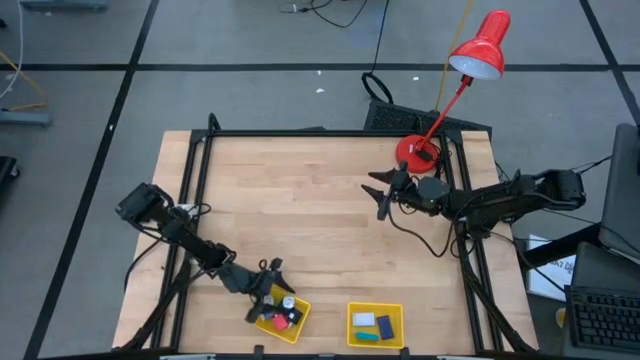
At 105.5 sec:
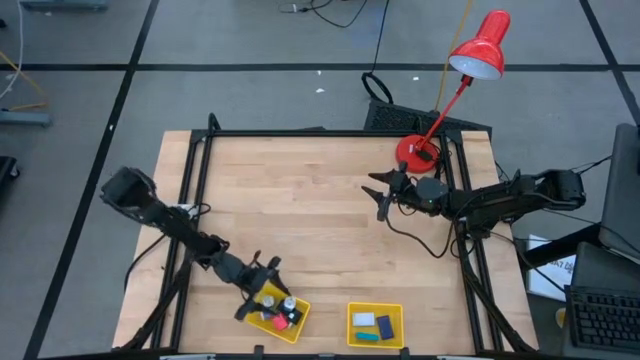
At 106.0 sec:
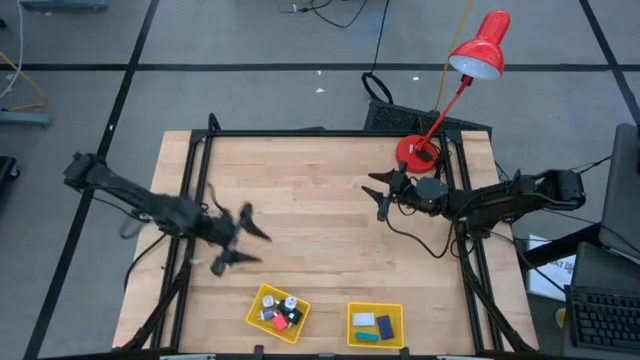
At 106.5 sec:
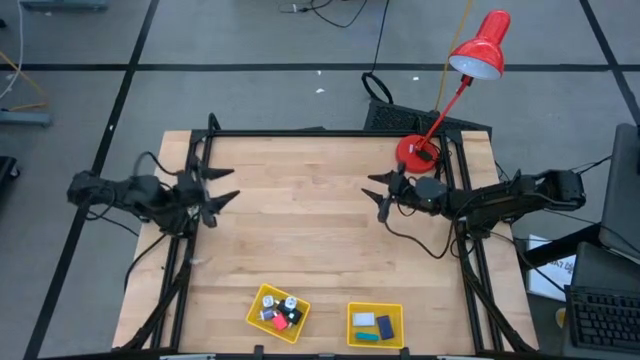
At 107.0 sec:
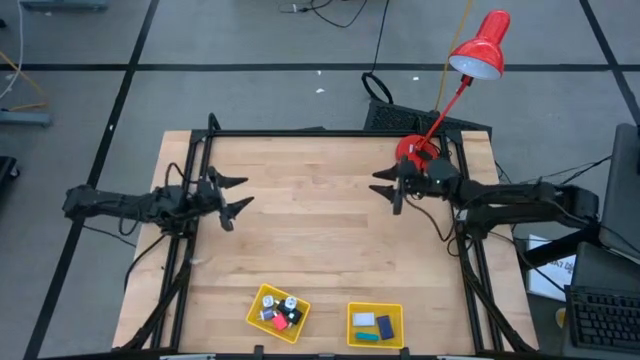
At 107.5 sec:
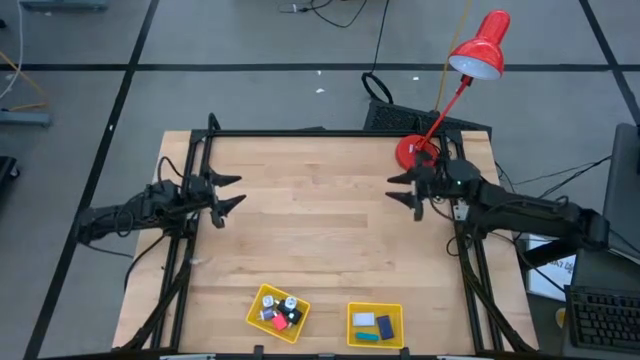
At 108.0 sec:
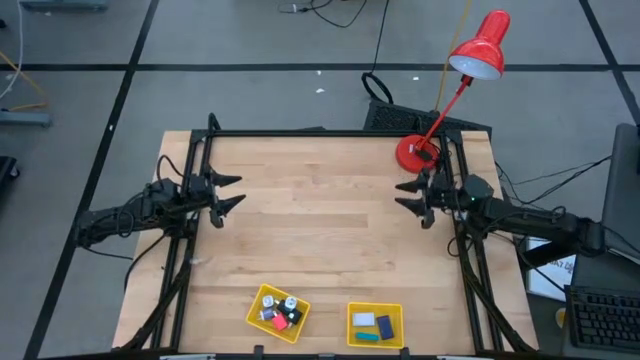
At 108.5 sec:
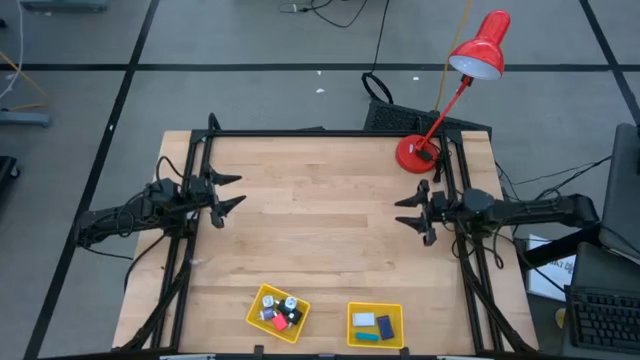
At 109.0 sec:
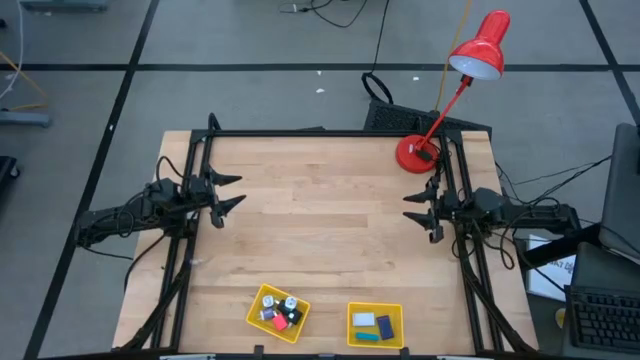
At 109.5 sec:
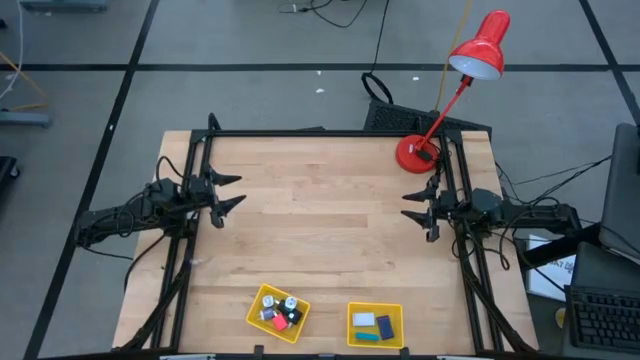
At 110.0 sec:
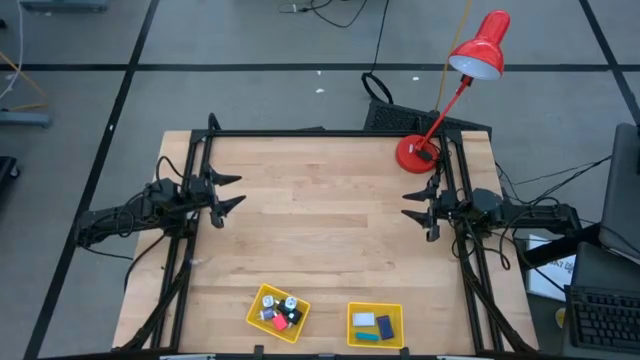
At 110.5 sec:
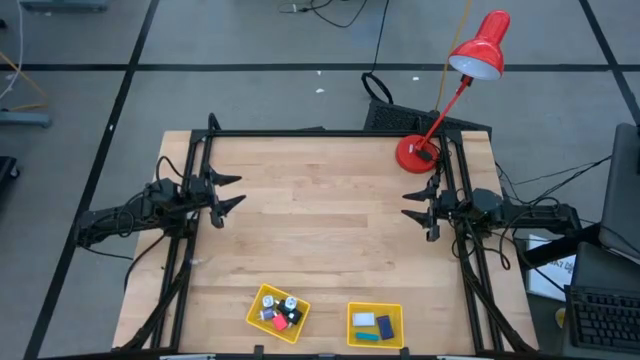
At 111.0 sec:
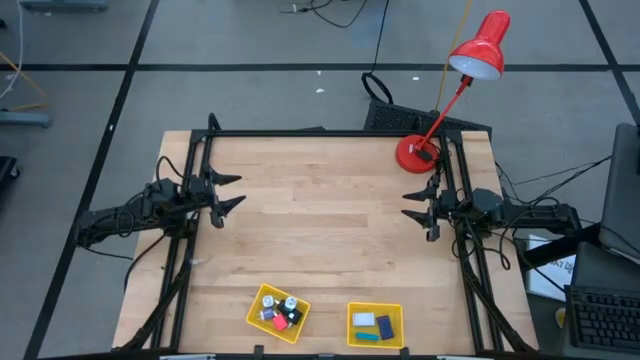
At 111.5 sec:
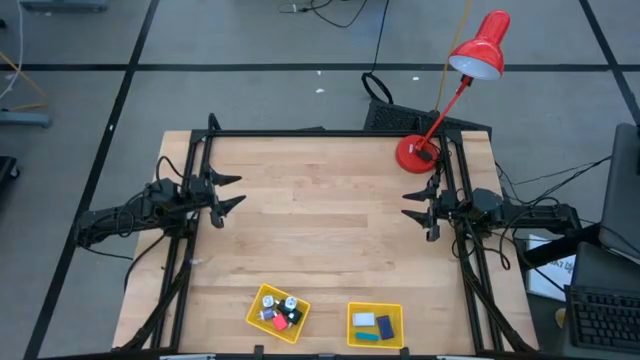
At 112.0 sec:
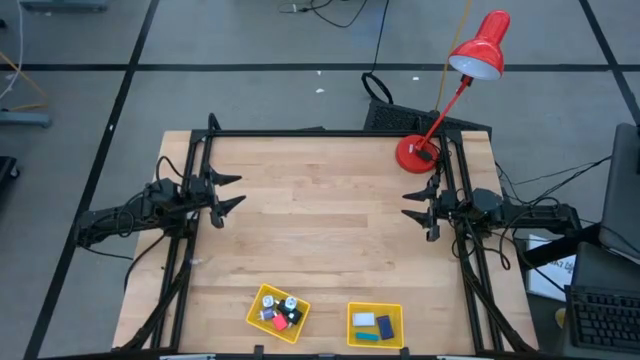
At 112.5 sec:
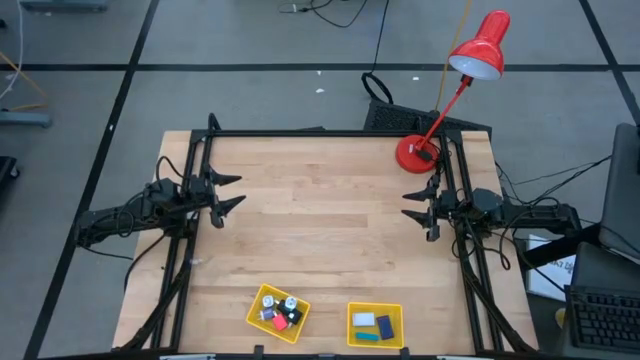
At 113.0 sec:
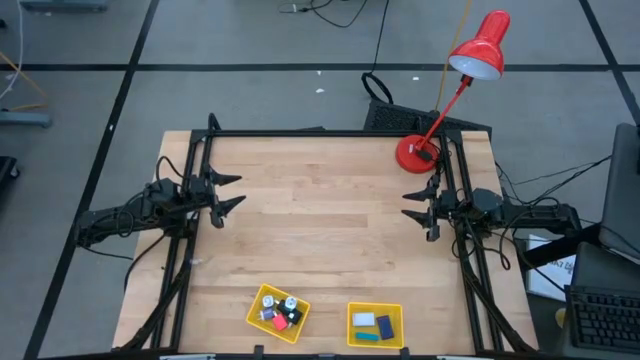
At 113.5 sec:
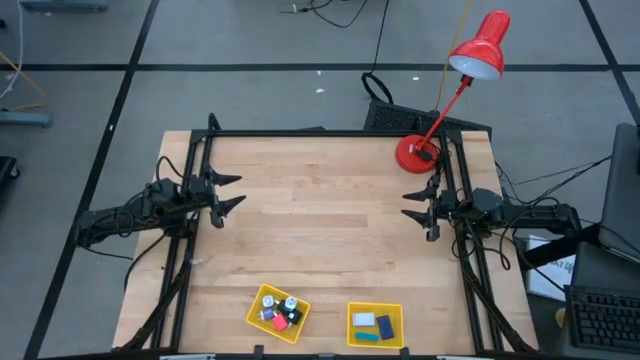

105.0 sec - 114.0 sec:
Task: Pick & Place Office items
Return to Home Position

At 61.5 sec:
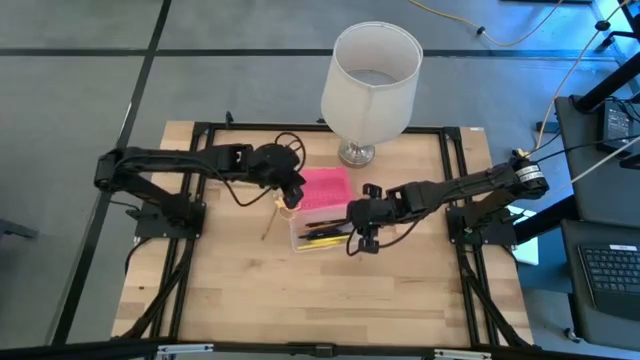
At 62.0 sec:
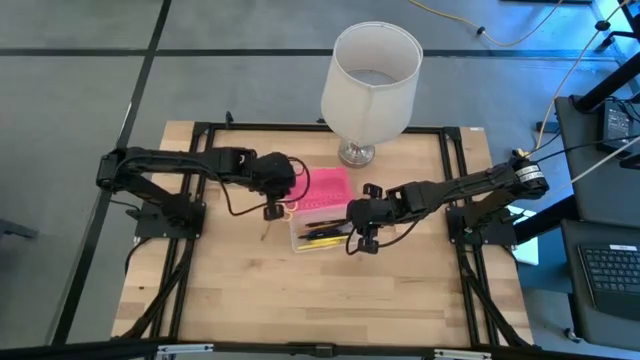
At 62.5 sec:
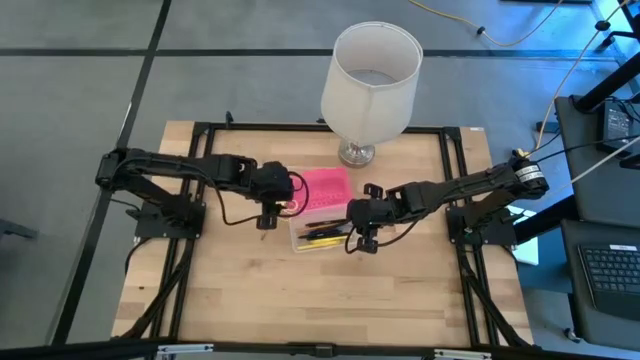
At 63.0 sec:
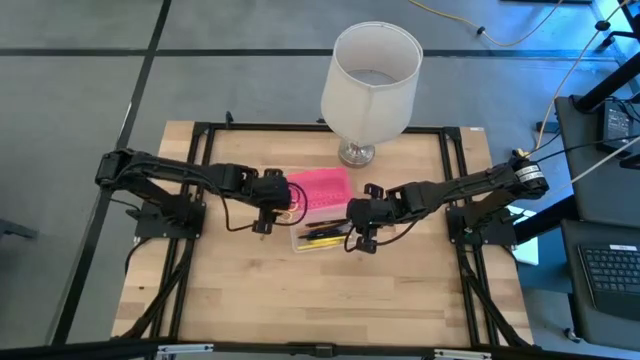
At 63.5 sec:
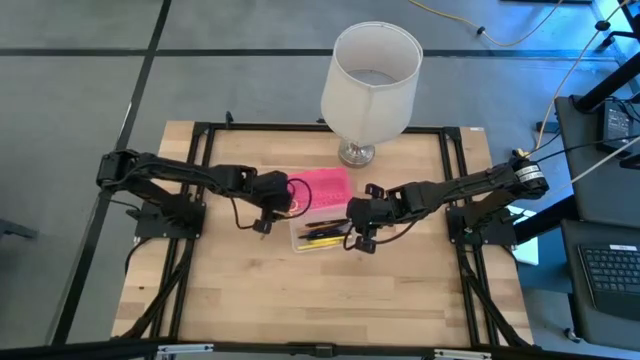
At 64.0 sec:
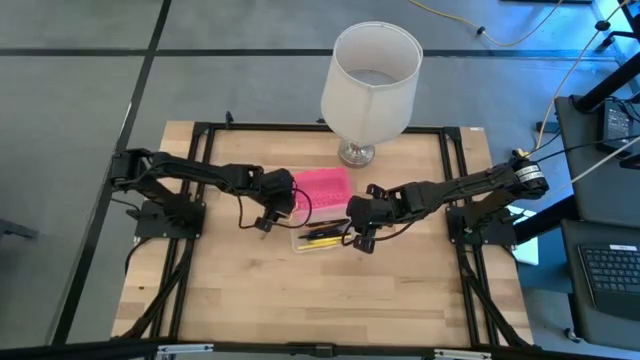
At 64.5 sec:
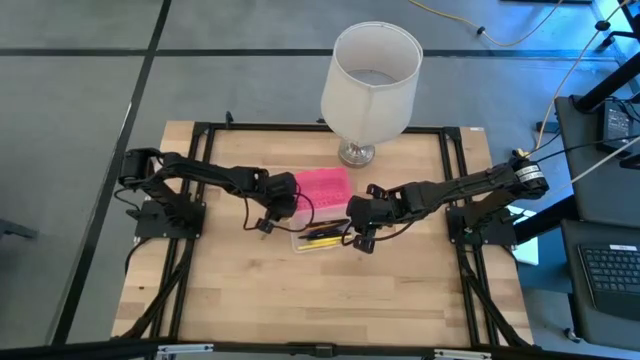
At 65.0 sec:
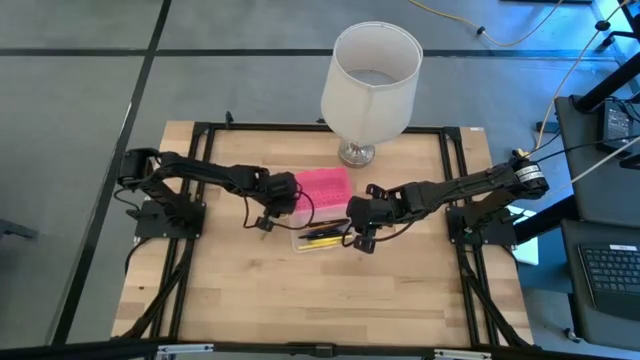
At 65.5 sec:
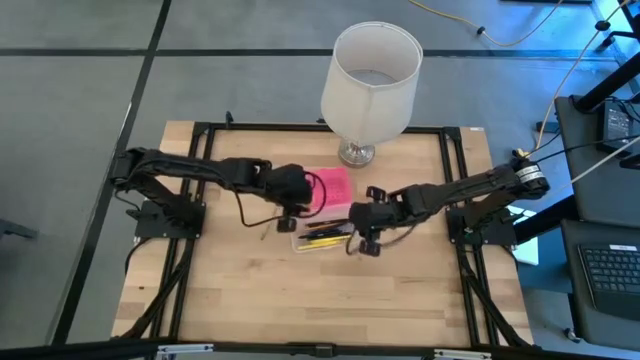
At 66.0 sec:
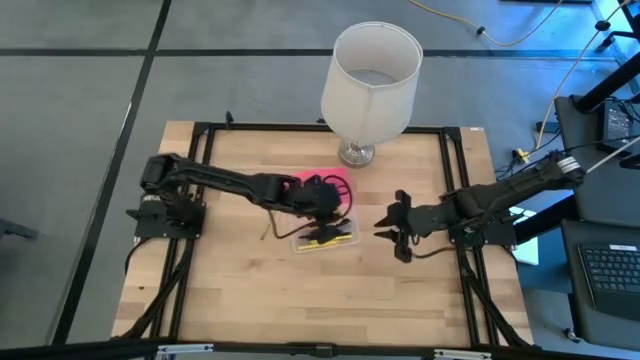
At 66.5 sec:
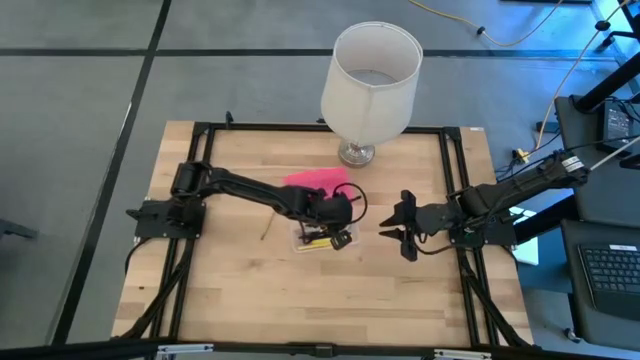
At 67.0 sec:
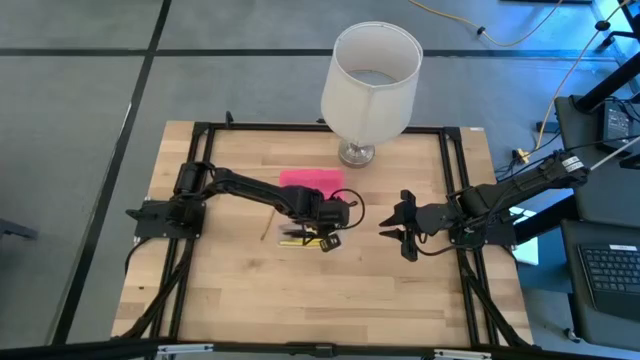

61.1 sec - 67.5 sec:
Task: Pick & place school supplies into a supply box
Put the yellow scissors into the supply box

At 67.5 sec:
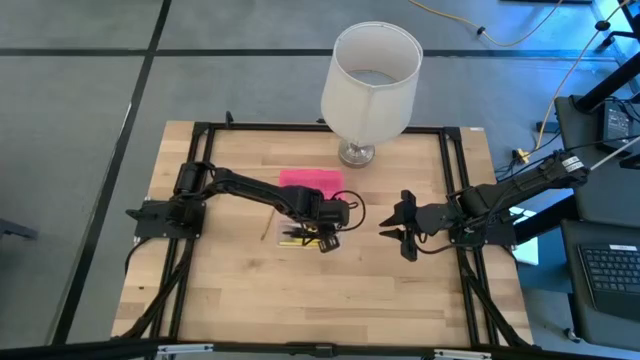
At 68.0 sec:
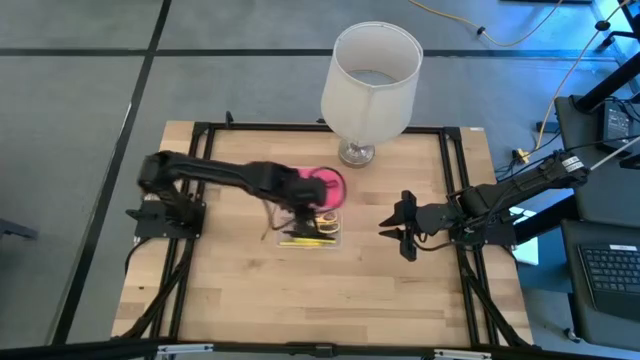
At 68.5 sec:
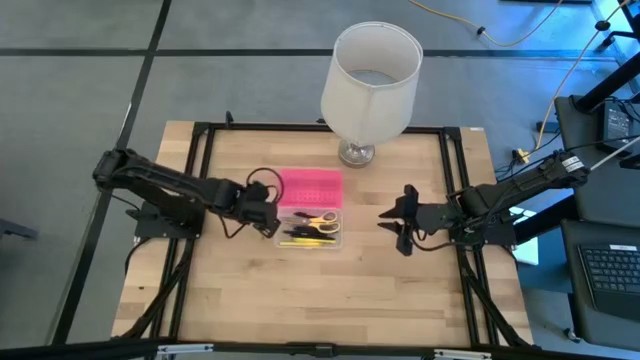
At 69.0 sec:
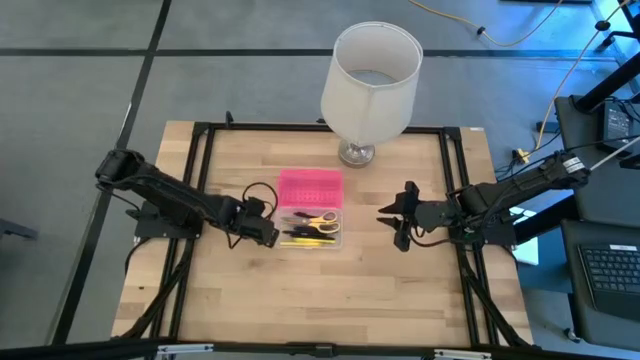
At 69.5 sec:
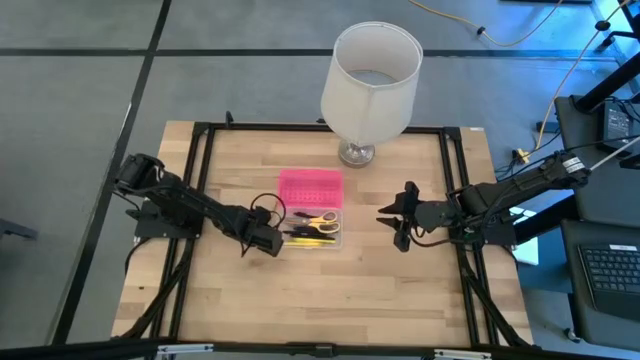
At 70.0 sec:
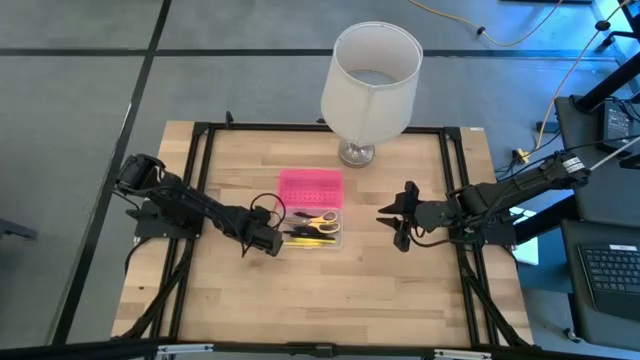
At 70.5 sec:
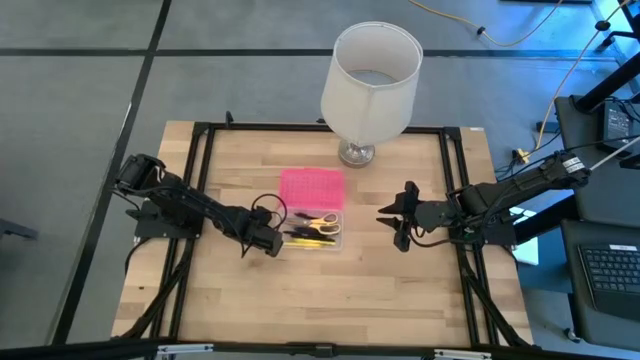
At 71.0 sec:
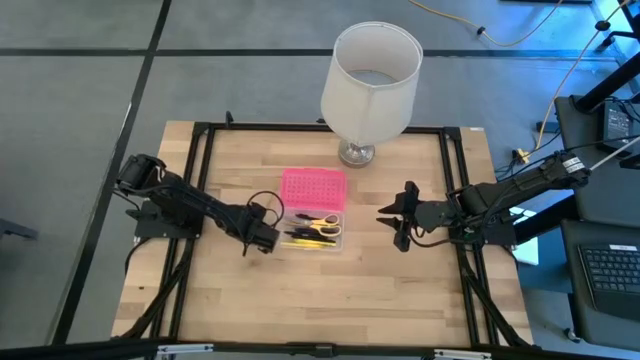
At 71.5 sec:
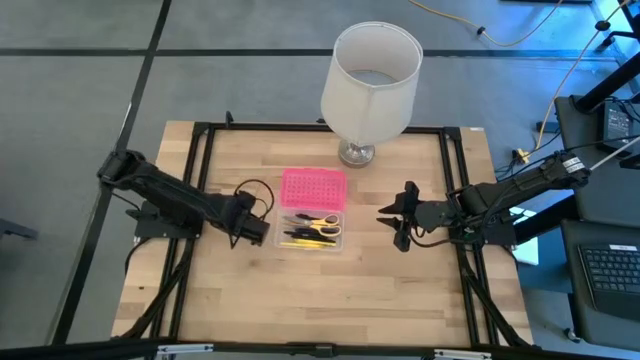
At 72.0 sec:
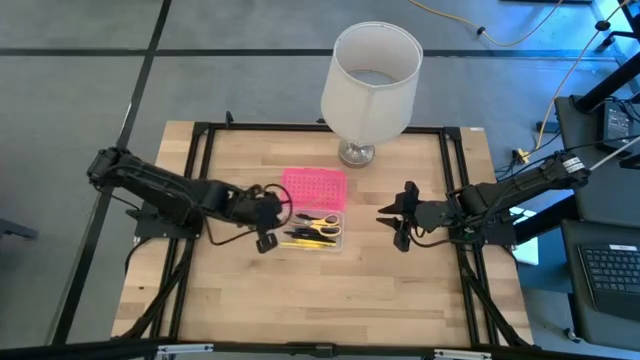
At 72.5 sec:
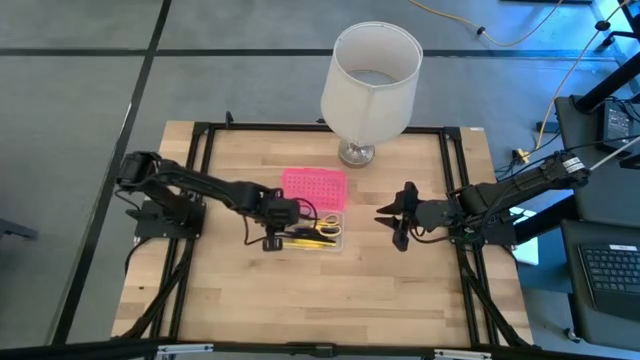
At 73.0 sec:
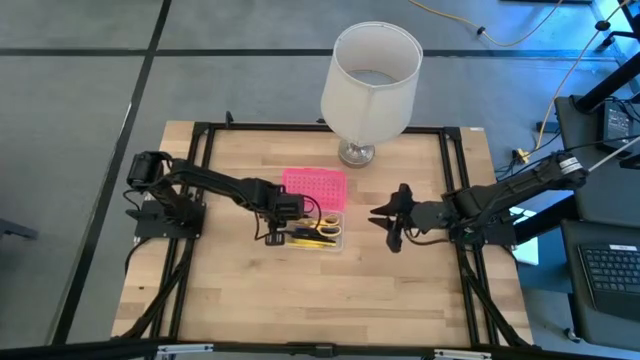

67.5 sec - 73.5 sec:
Put the yellow pencil into the supply box
